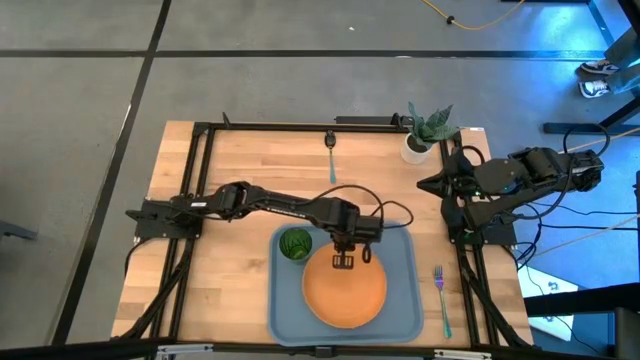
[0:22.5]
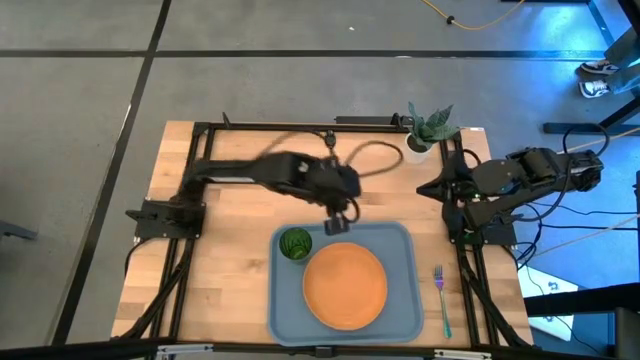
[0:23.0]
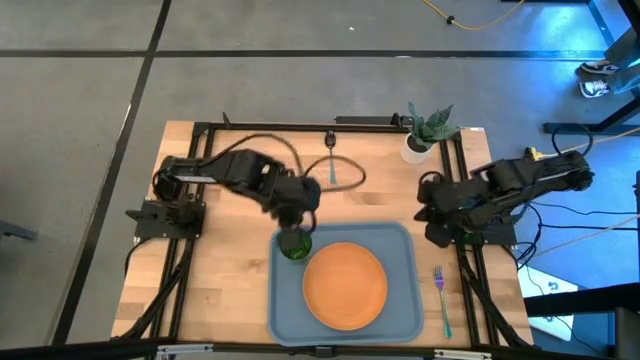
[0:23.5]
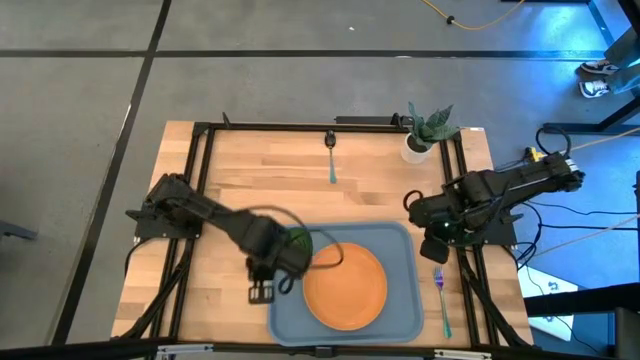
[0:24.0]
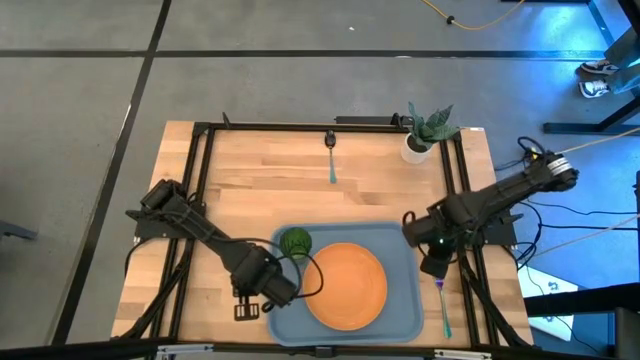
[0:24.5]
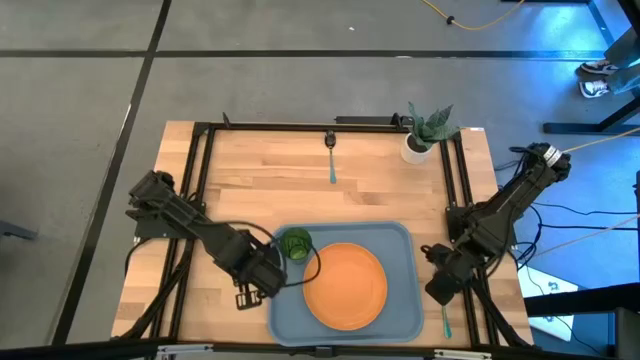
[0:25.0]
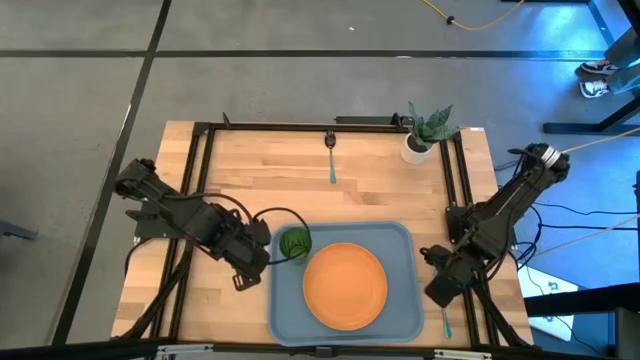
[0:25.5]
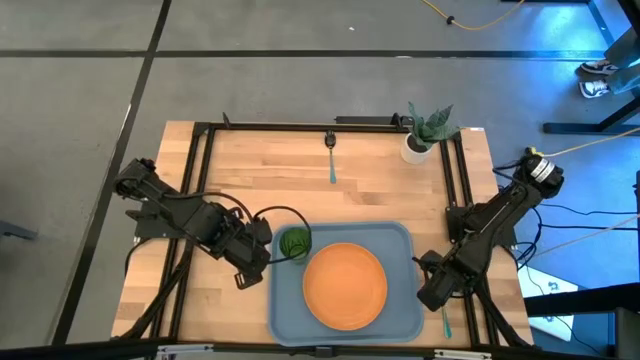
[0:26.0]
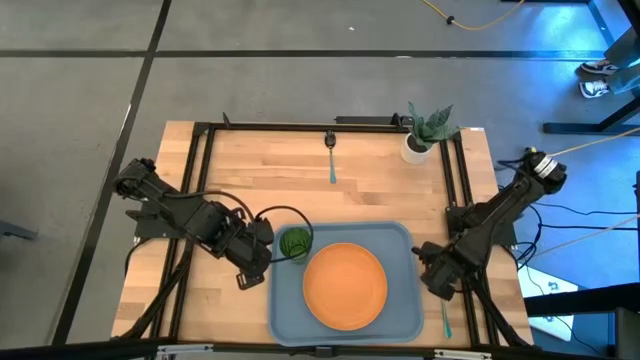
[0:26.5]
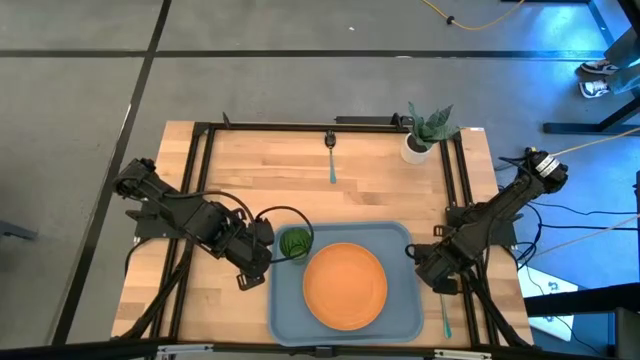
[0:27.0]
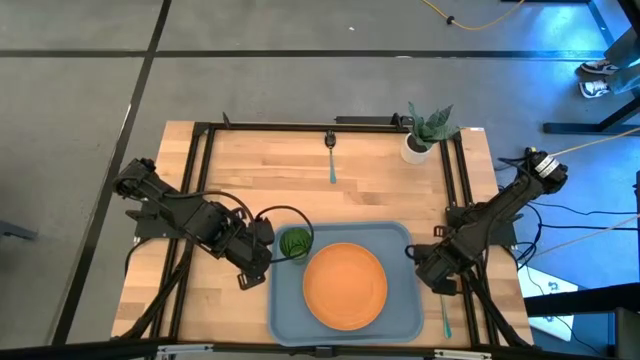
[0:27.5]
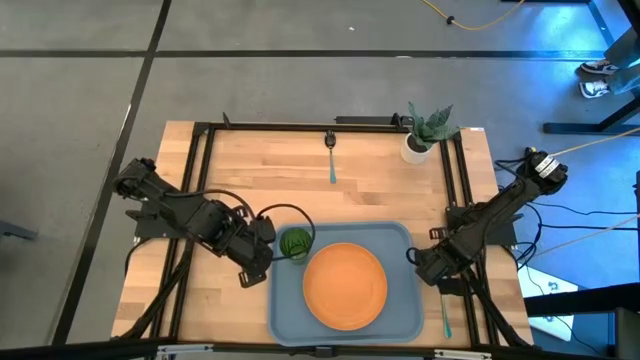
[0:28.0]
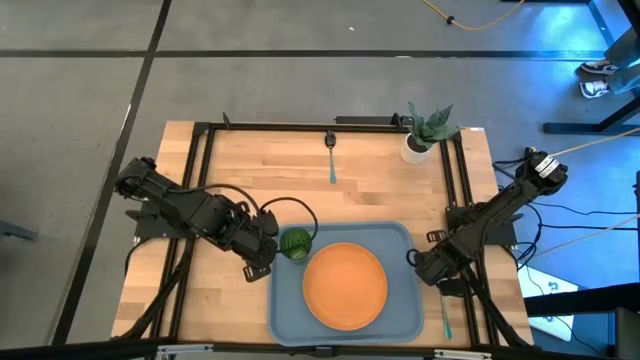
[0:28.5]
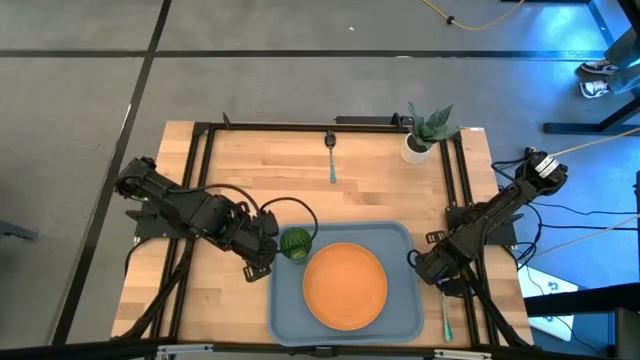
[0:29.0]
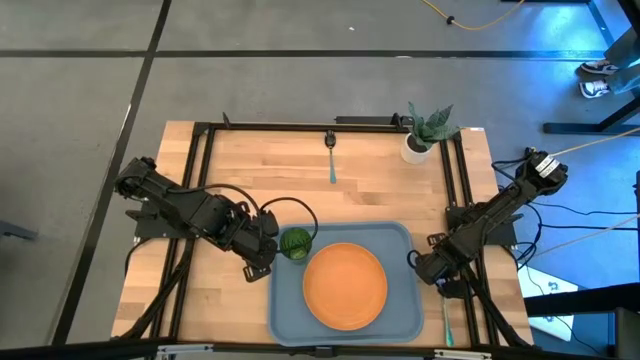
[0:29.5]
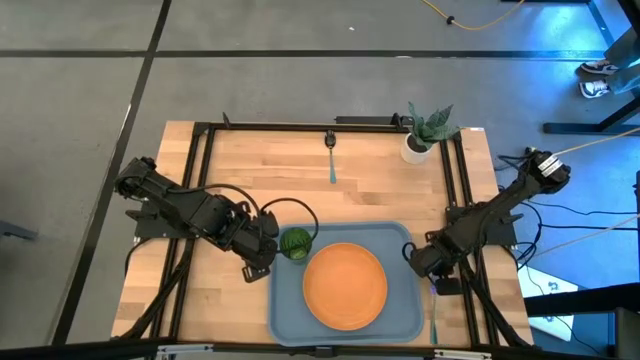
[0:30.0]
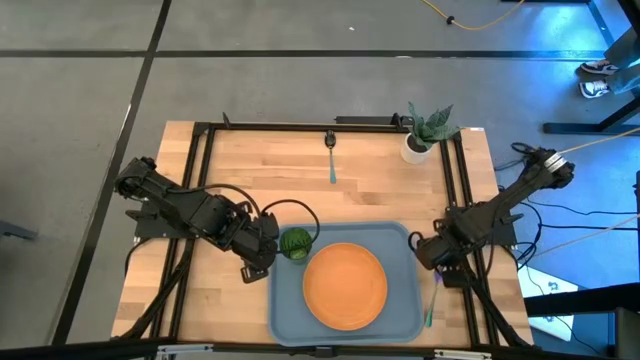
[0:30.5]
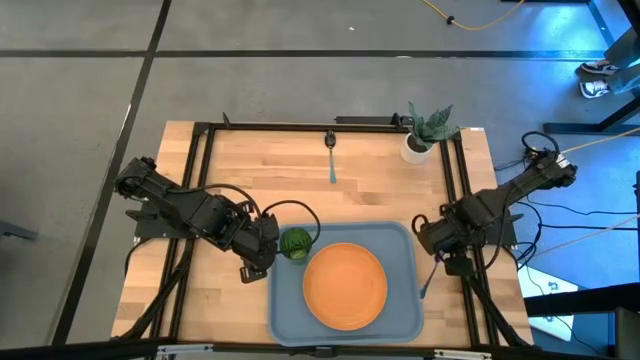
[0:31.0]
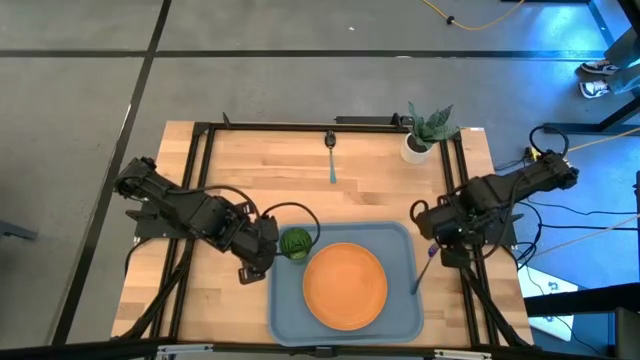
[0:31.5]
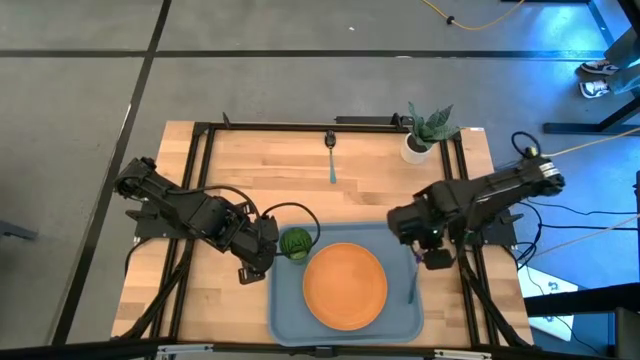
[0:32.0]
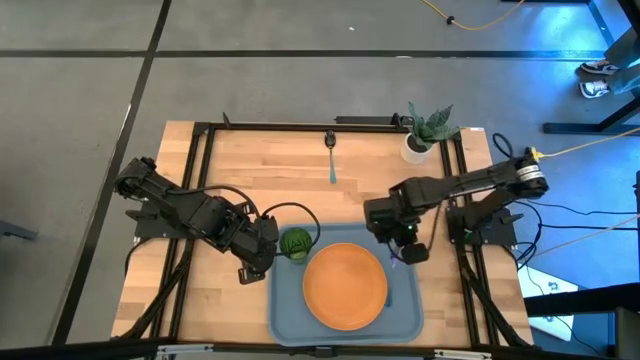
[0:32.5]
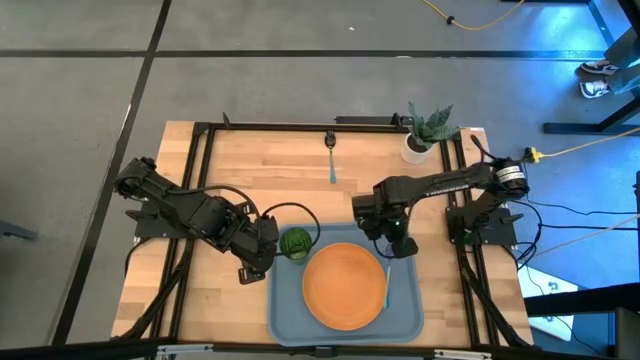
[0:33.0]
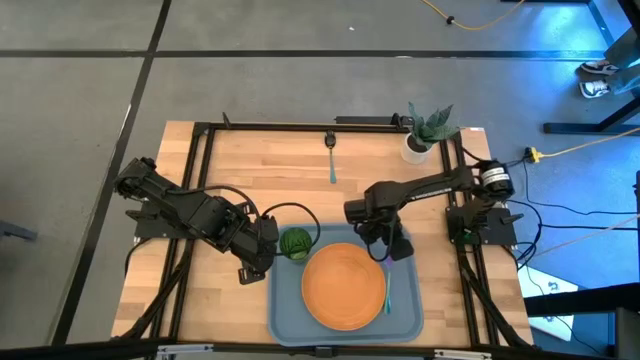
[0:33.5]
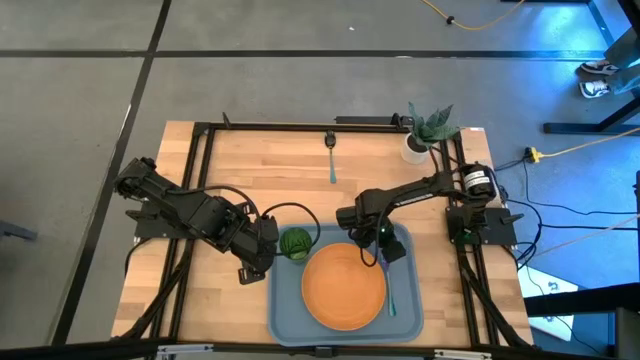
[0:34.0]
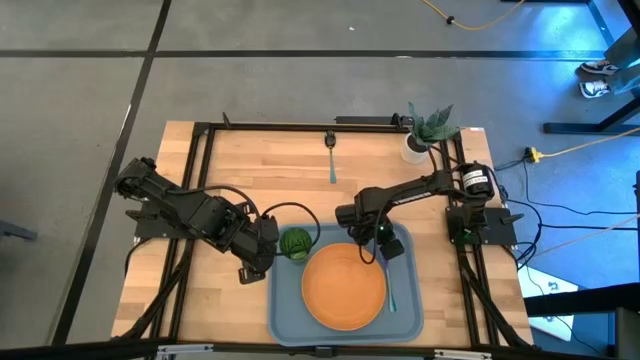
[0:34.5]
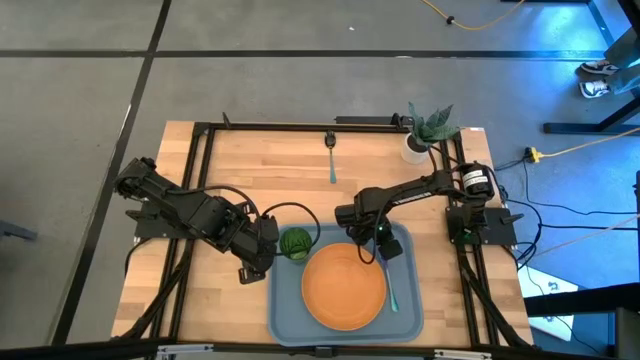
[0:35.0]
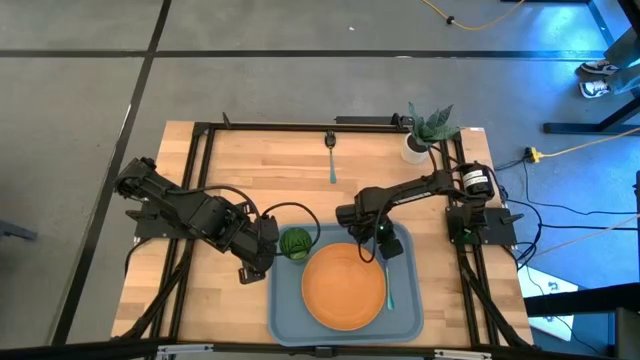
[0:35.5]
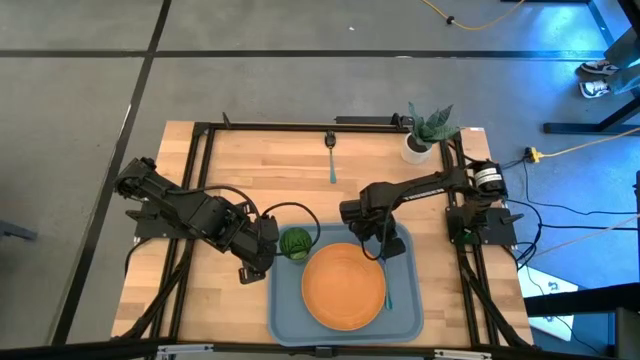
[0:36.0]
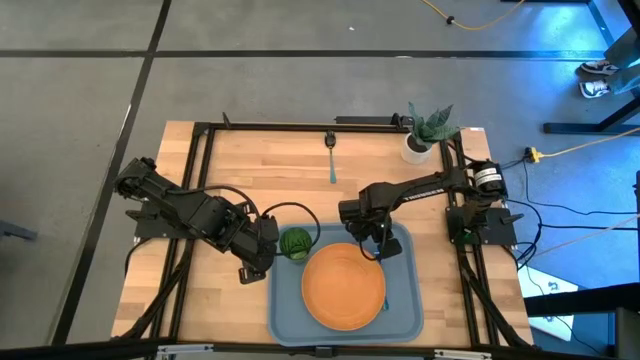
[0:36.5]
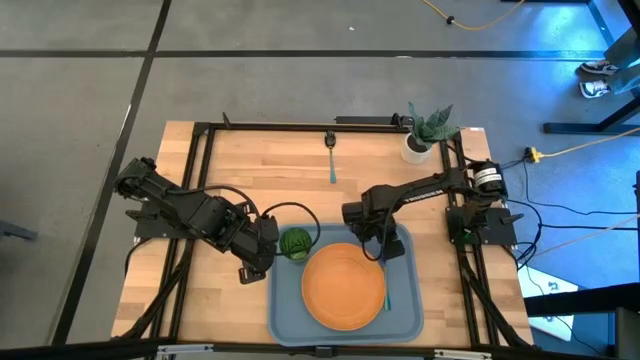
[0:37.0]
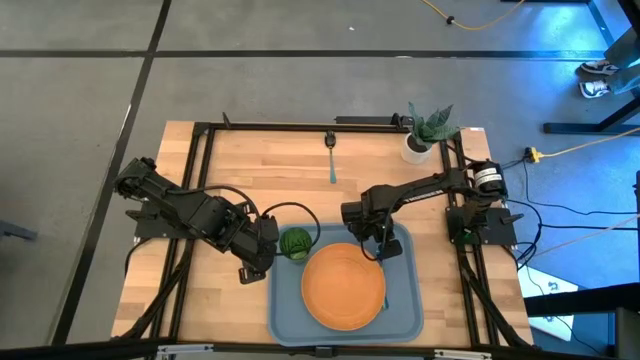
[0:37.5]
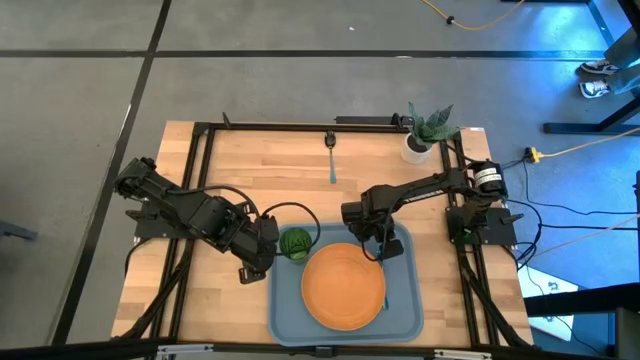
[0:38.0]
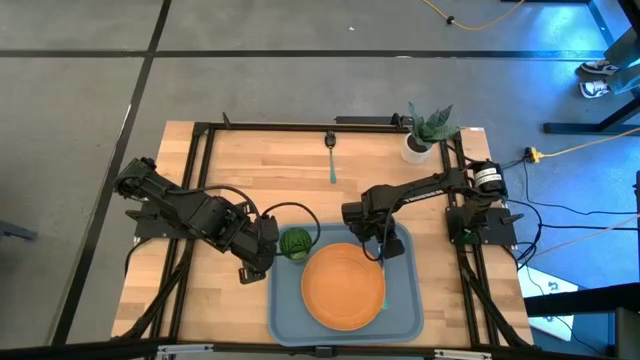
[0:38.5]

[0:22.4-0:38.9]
Task: Pick and place plate/cup/fork/spoon on tray
Put the green fork on the right side of the gray serving tray

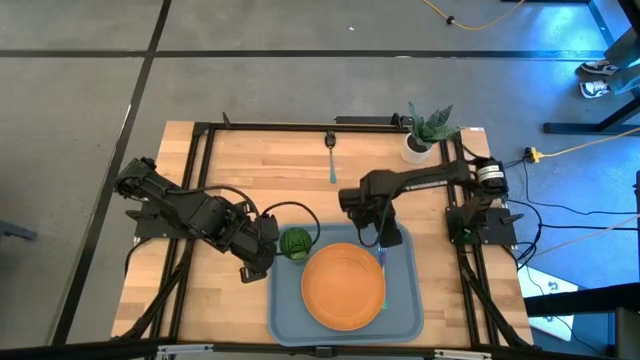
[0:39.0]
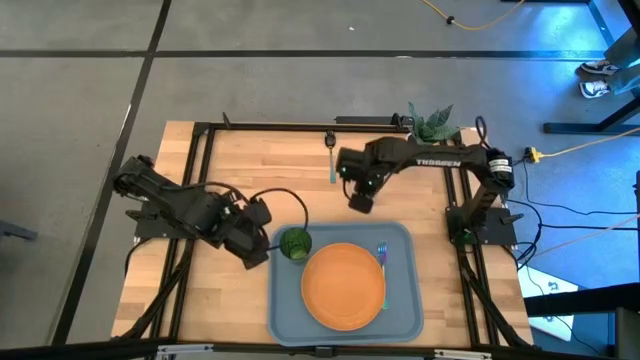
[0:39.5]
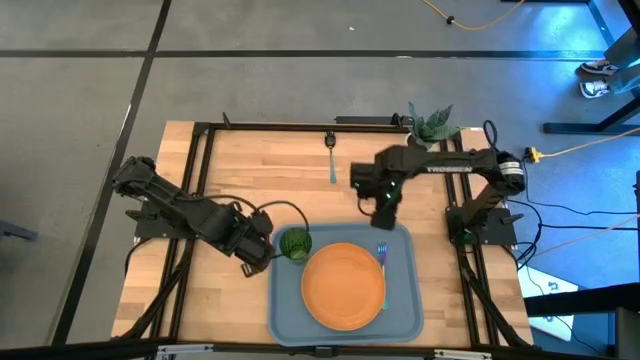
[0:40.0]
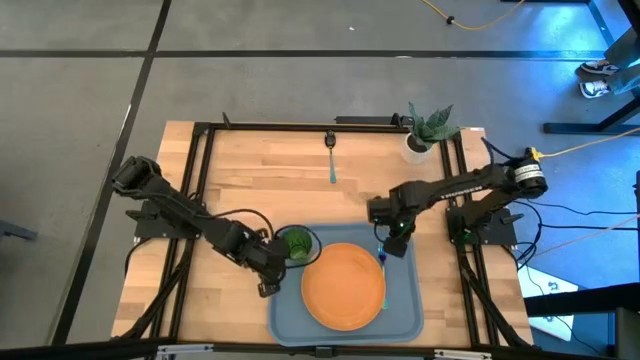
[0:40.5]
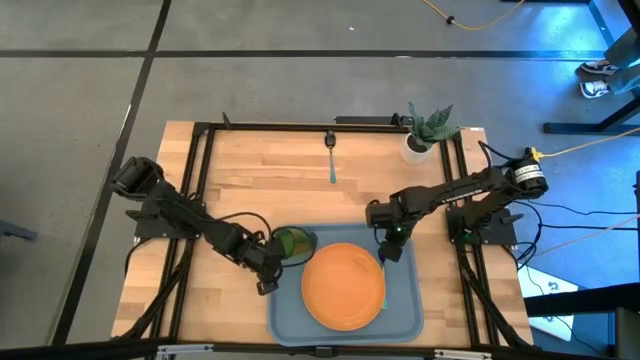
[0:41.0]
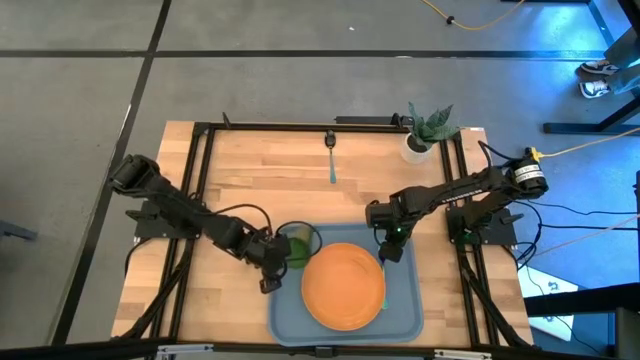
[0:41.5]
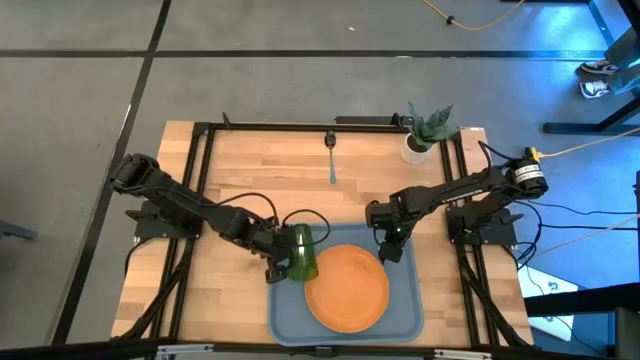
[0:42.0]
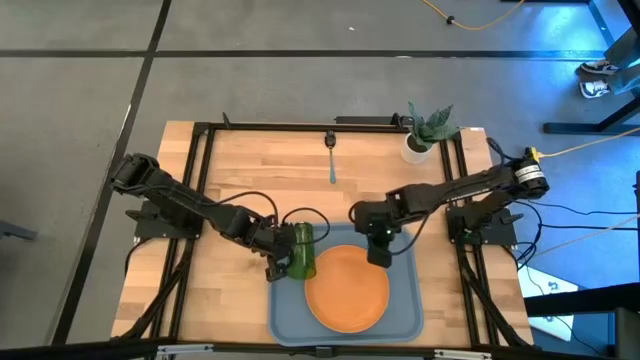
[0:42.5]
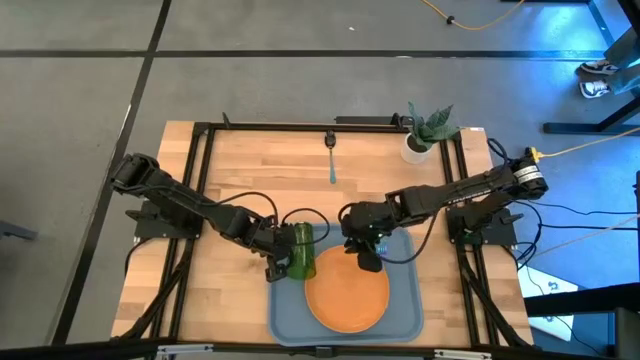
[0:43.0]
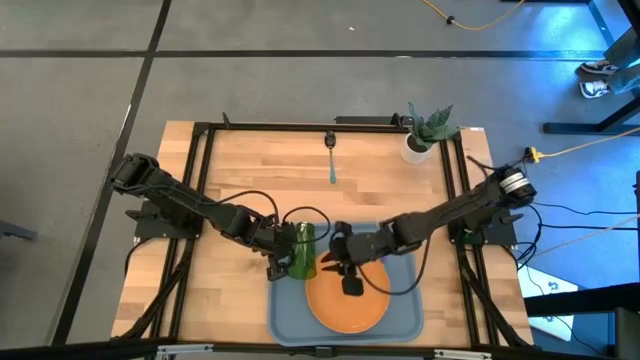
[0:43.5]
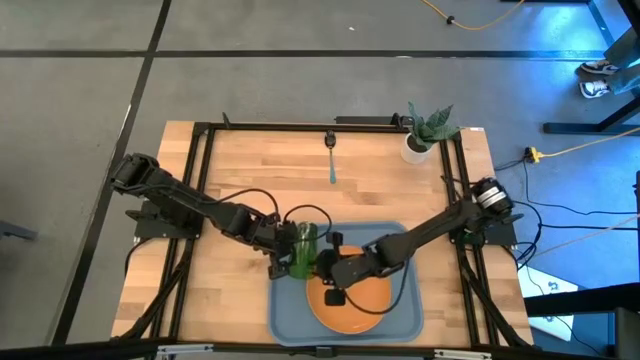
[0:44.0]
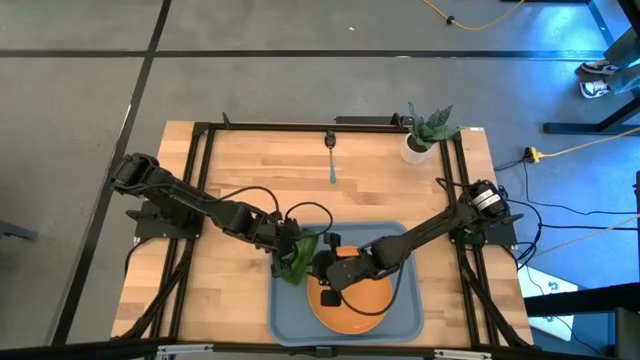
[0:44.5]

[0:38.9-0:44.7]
Remove the green cup
